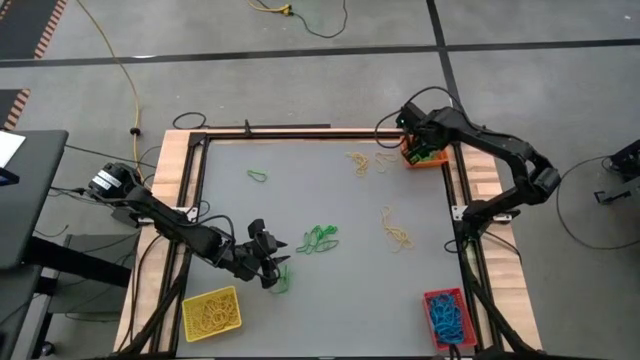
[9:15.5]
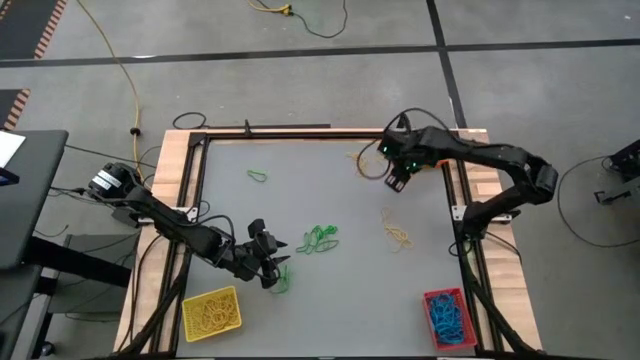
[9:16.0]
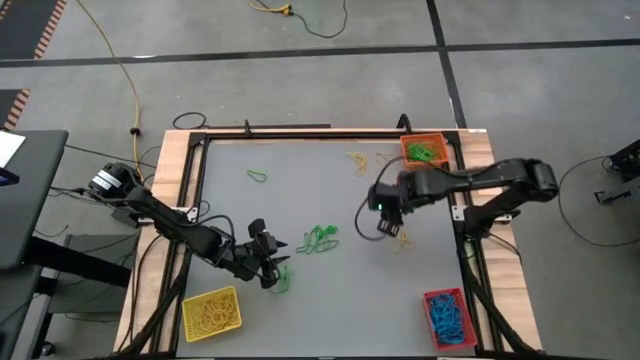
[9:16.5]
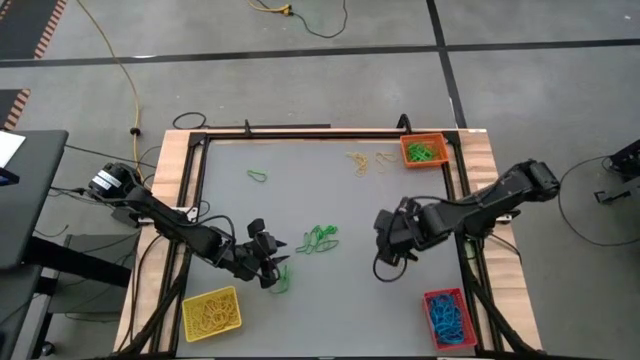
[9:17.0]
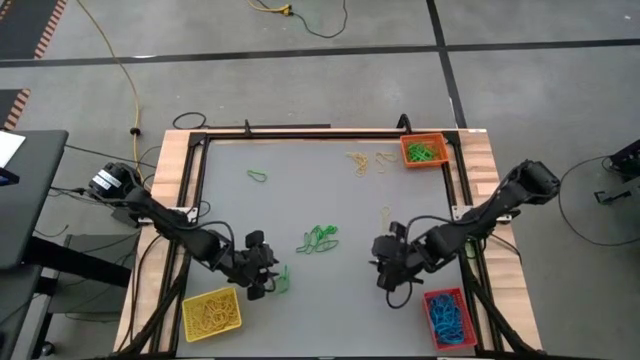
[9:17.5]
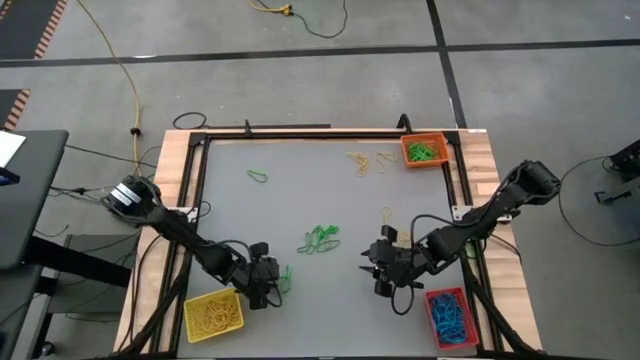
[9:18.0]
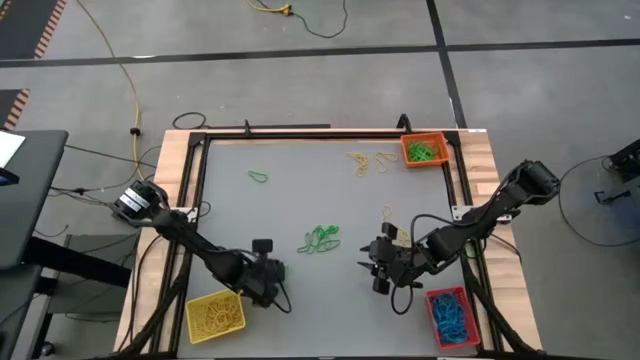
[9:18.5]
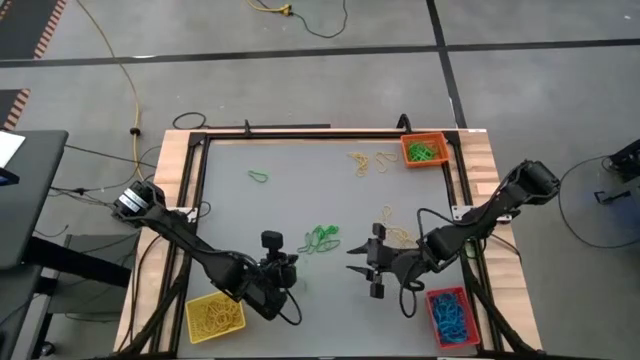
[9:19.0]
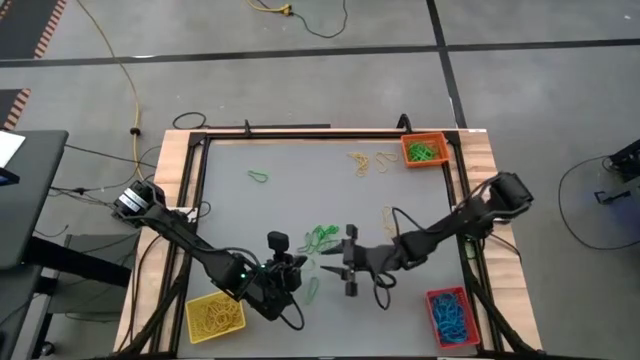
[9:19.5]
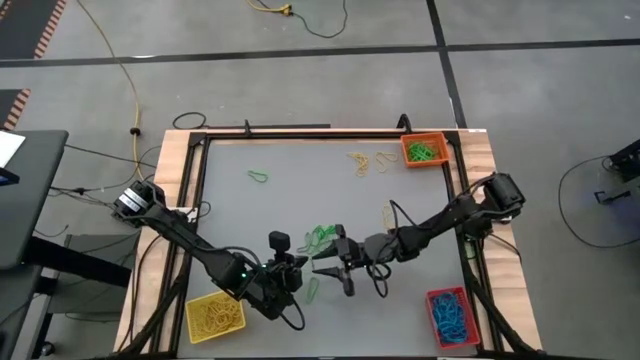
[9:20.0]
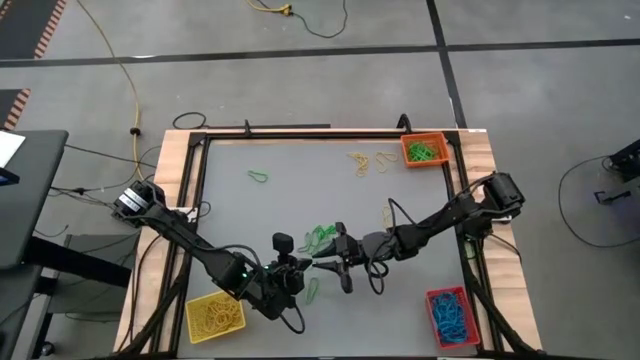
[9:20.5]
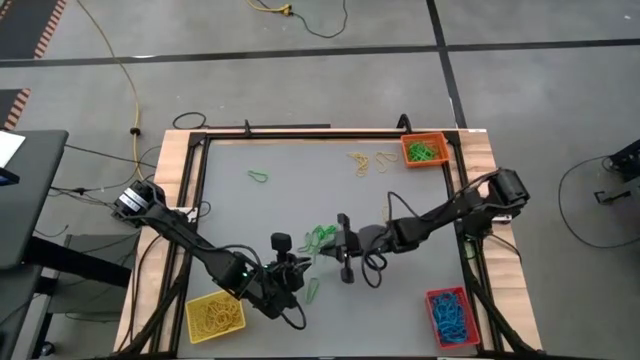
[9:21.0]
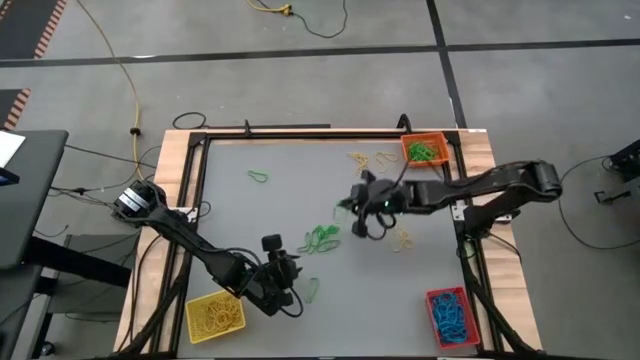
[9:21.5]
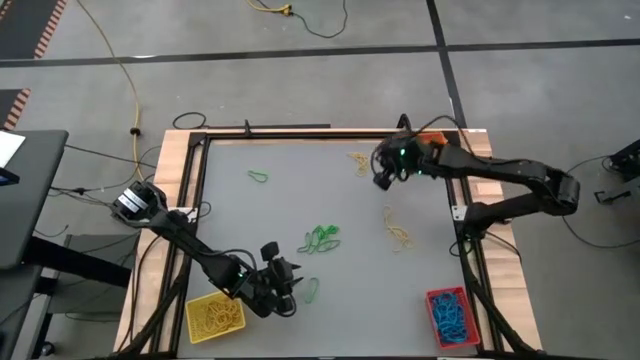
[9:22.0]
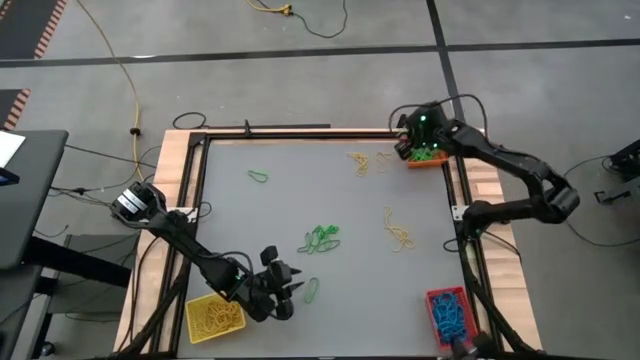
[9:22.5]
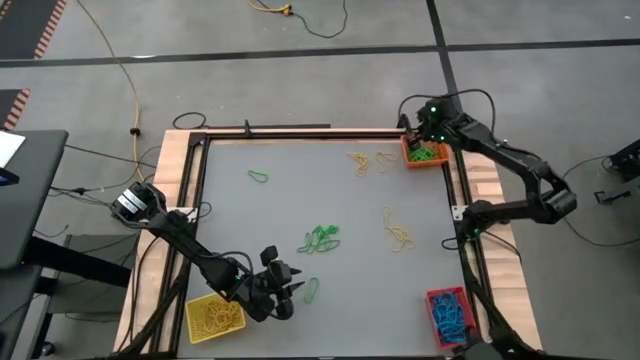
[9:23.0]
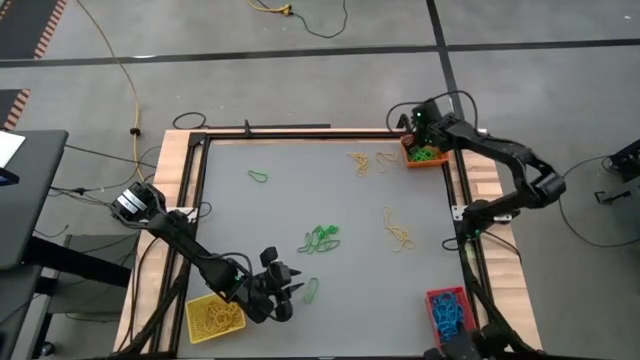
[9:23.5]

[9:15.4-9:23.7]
Task: Sort rubber bands into baskets
Put the green rubber band into the orange bin

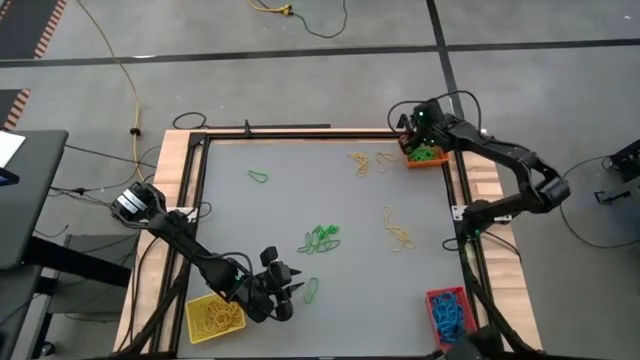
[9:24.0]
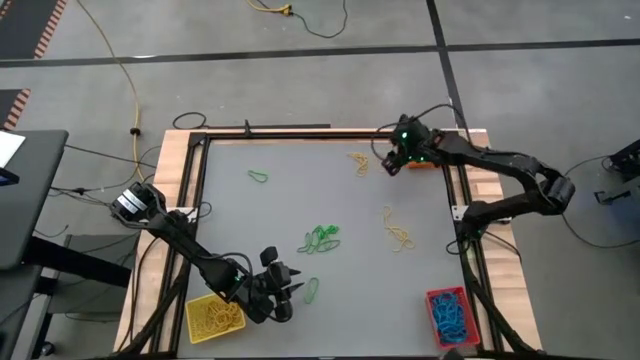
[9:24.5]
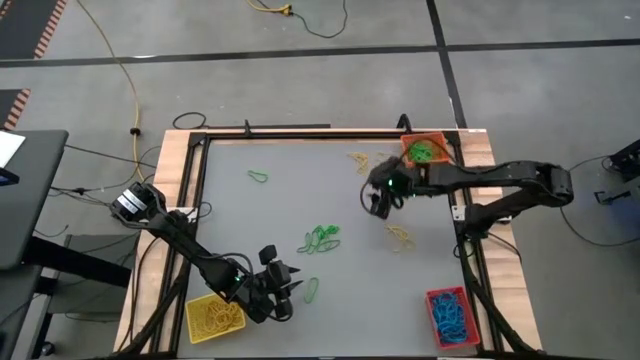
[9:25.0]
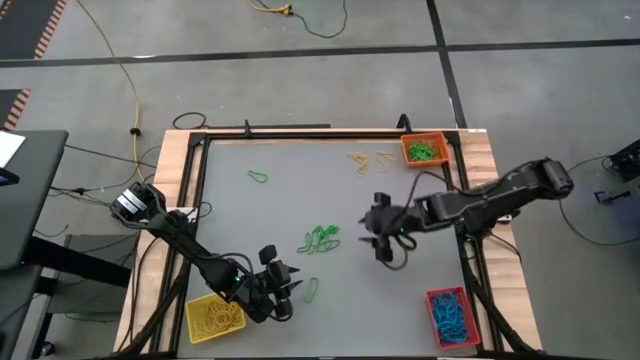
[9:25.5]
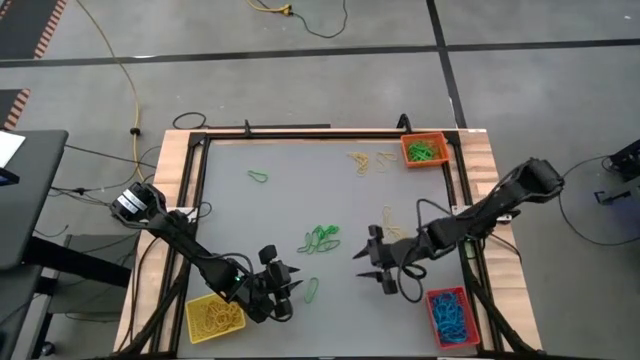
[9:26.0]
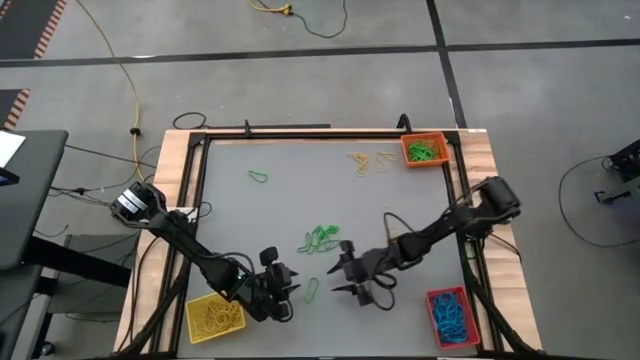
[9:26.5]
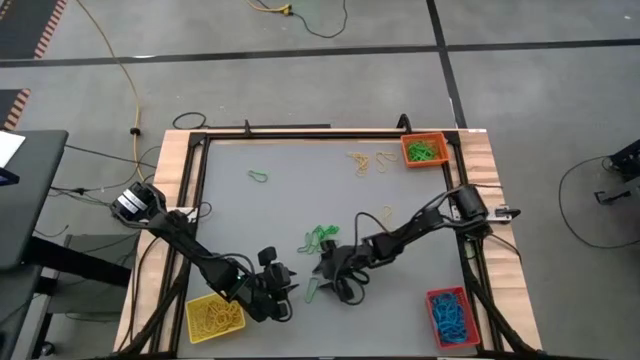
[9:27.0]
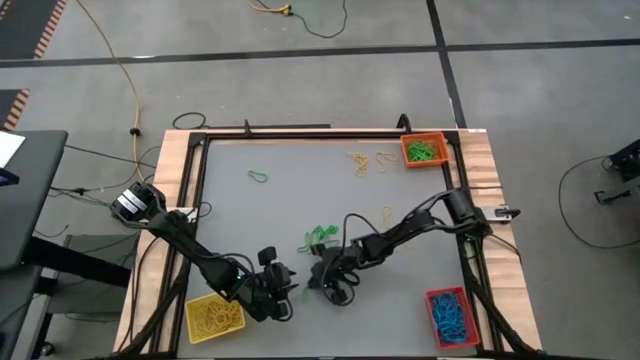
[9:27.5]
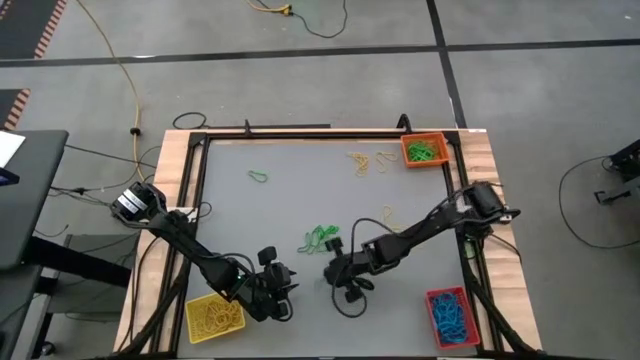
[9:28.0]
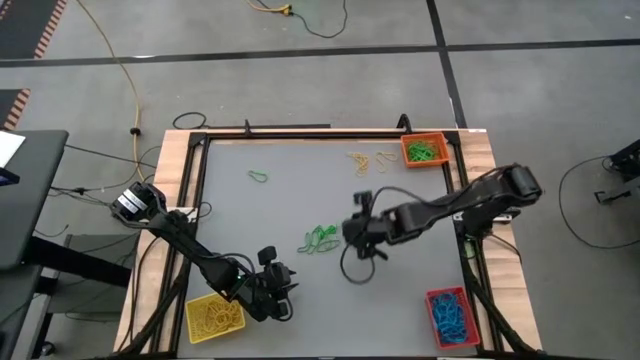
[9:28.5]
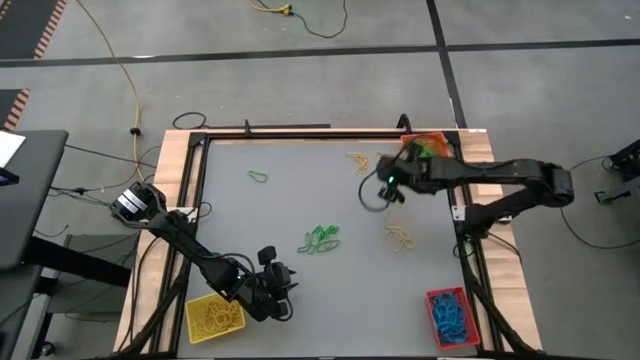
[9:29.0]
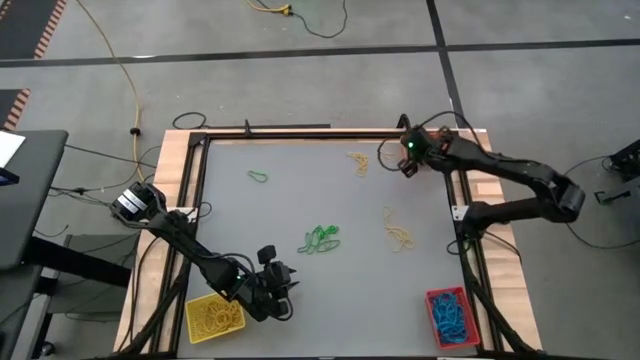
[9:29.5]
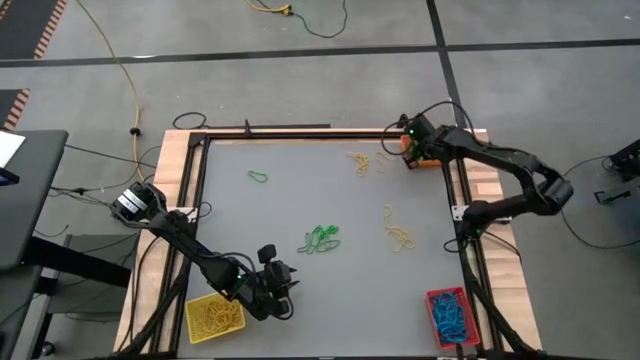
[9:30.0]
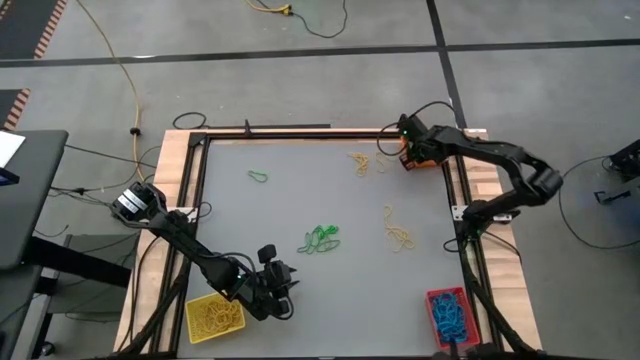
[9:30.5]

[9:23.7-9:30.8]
Put the green rubber band into the orange bin

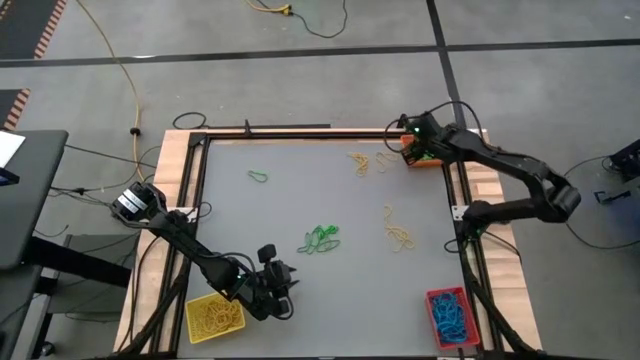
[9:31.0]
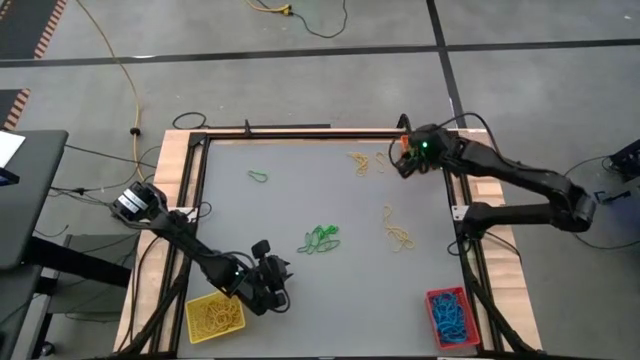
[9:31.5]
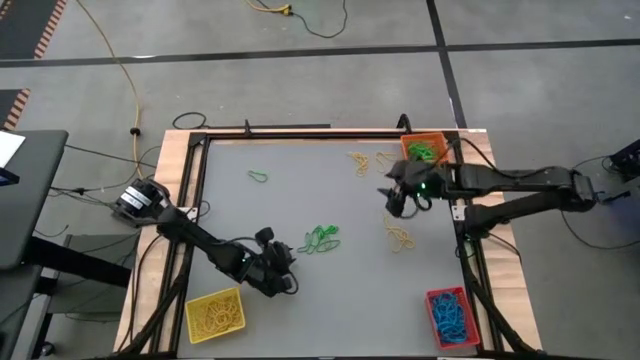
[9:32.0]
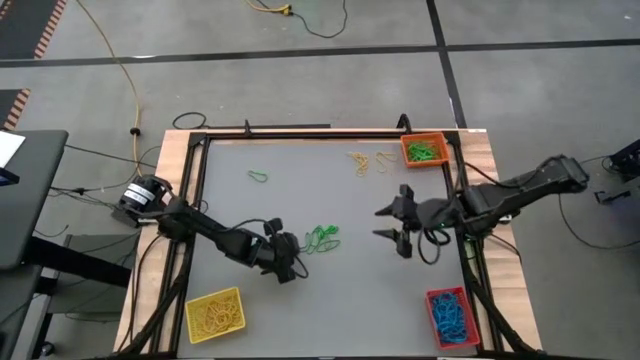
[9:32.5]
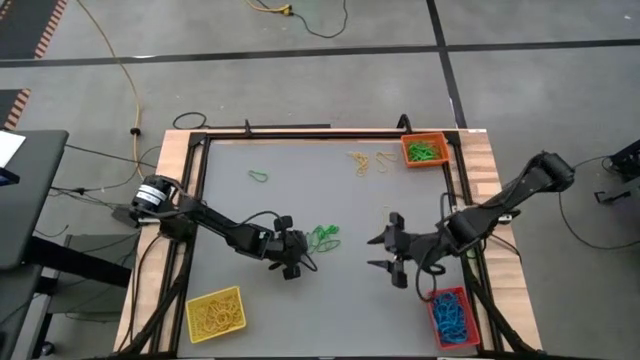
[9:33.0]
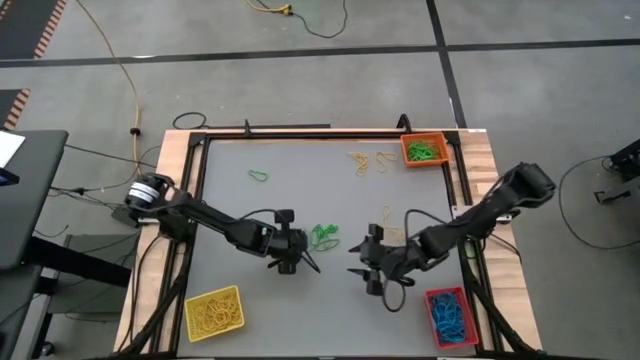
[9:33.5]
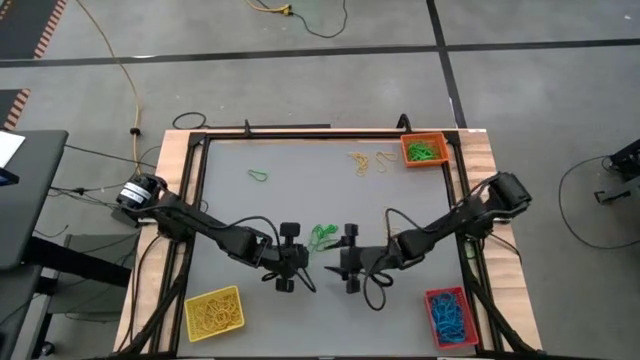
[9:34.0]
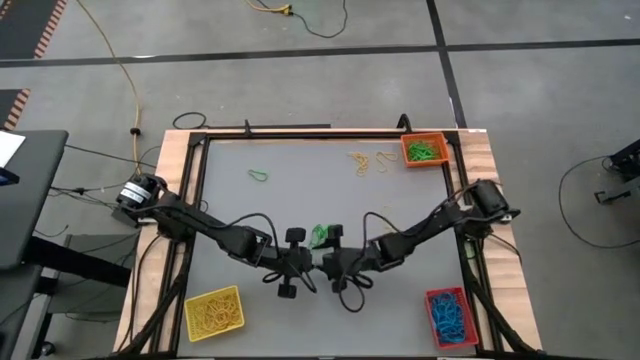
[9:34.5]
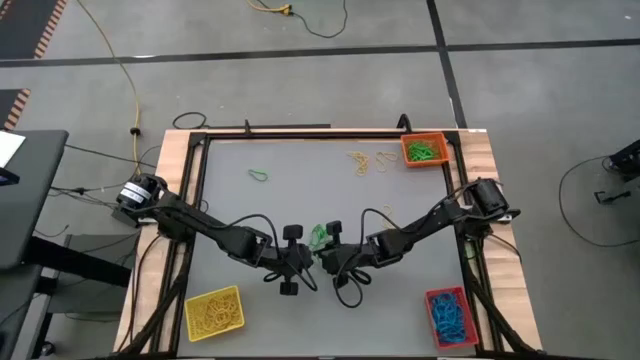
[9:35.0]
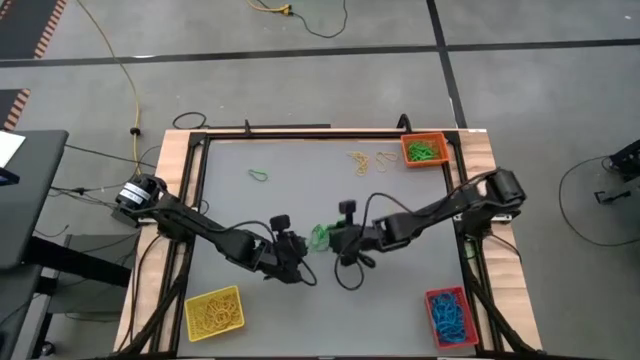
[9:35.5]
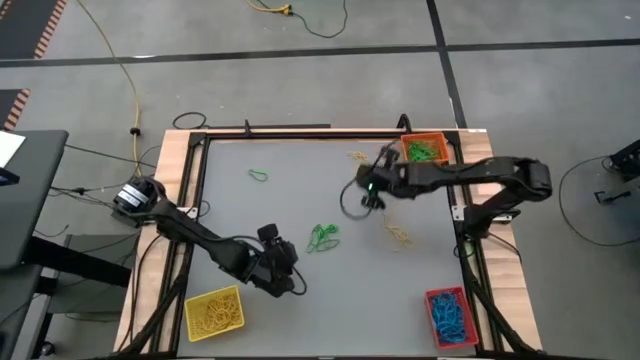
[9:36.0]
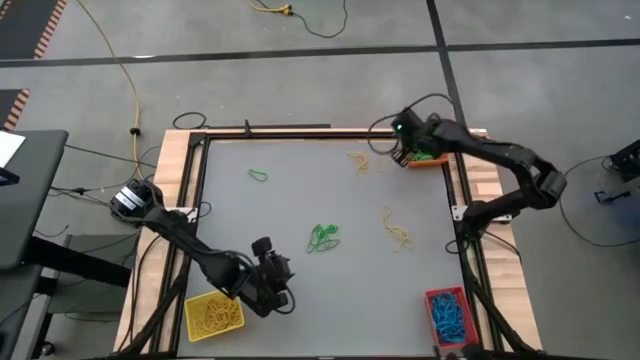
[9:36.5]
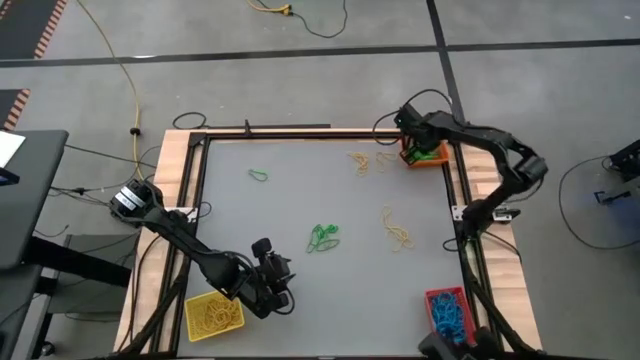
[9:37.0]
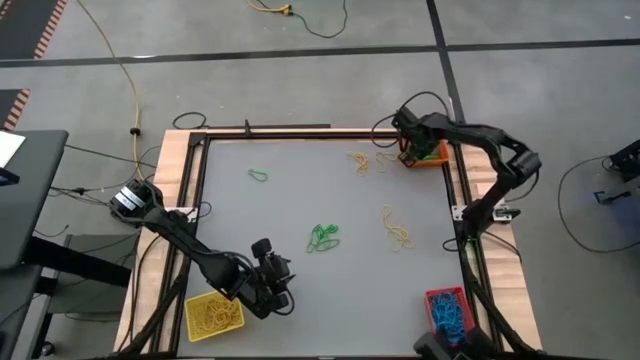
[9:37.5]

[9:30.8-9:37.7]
Put the green rubber band into the orange bin
